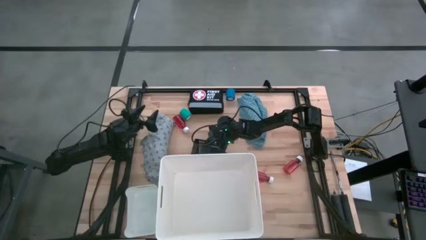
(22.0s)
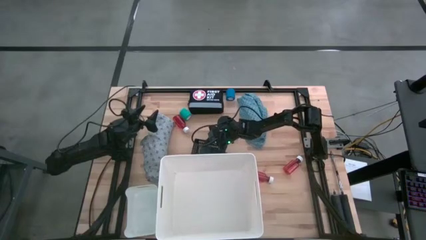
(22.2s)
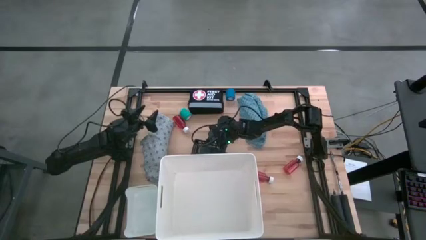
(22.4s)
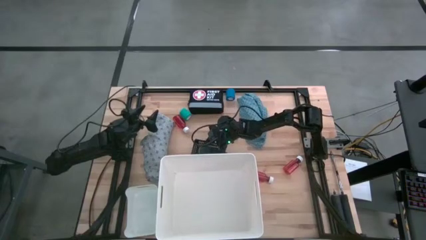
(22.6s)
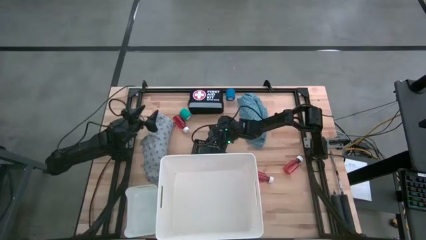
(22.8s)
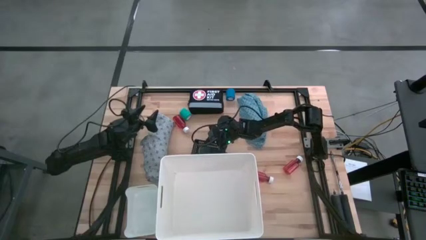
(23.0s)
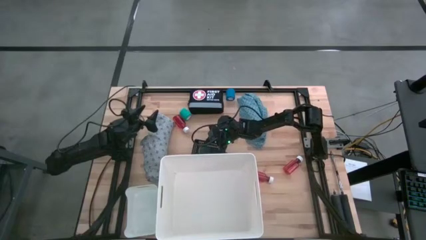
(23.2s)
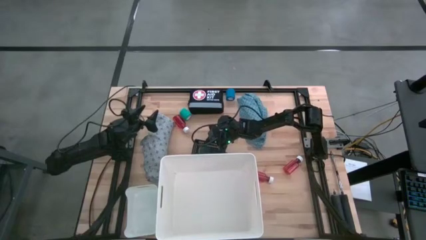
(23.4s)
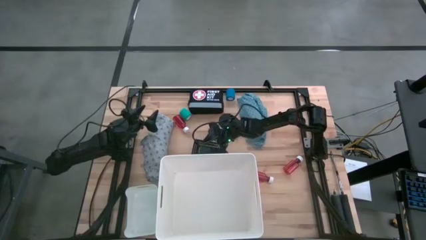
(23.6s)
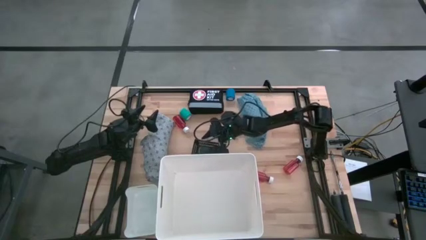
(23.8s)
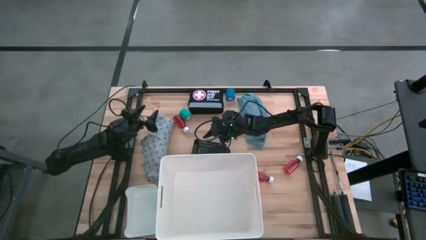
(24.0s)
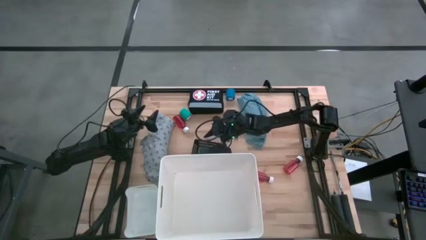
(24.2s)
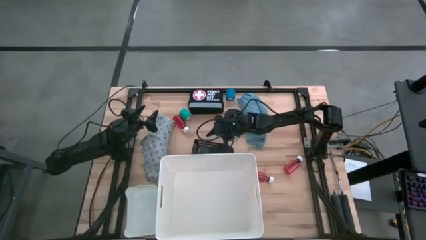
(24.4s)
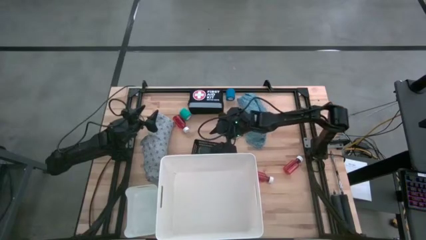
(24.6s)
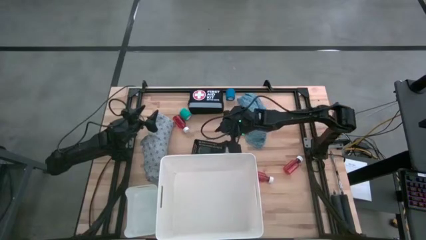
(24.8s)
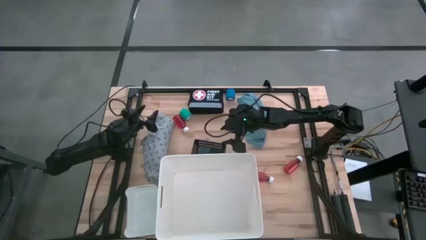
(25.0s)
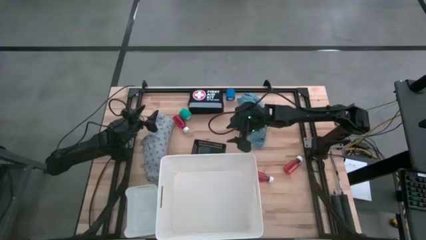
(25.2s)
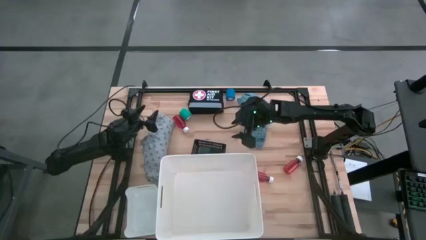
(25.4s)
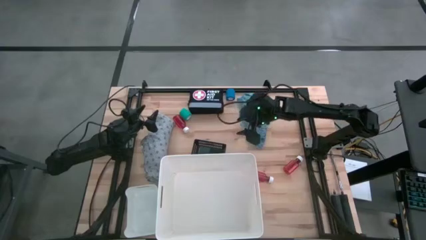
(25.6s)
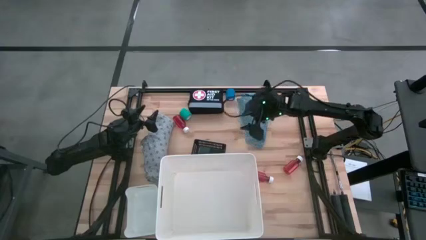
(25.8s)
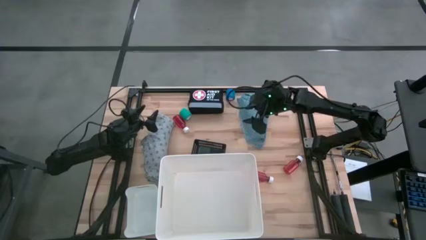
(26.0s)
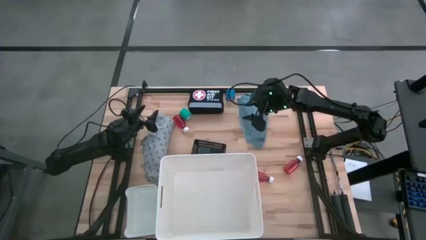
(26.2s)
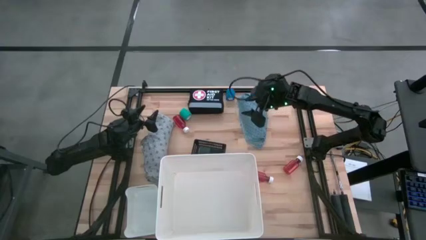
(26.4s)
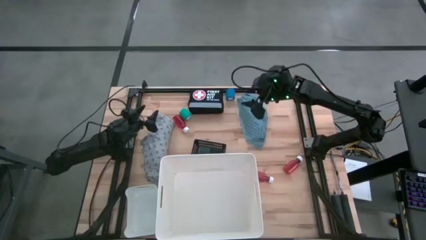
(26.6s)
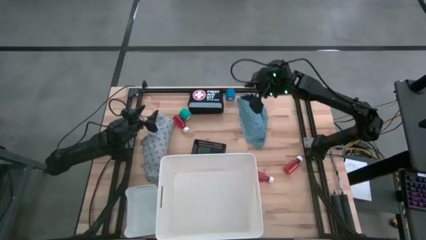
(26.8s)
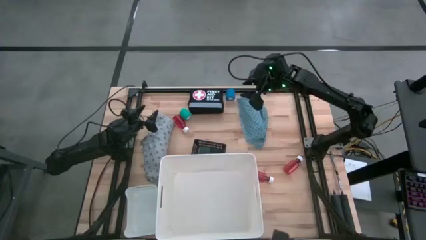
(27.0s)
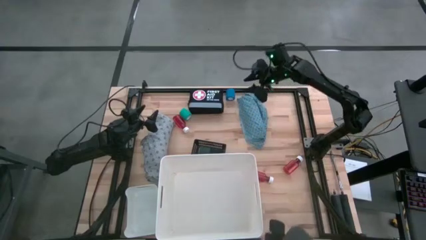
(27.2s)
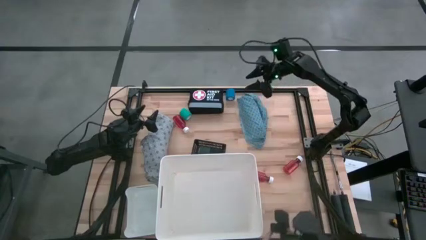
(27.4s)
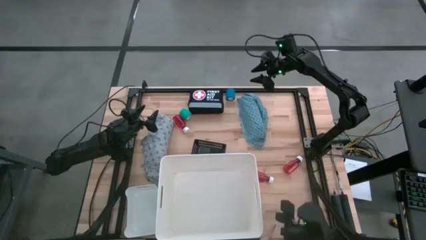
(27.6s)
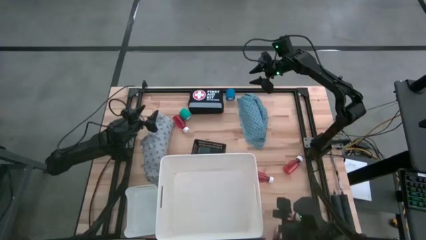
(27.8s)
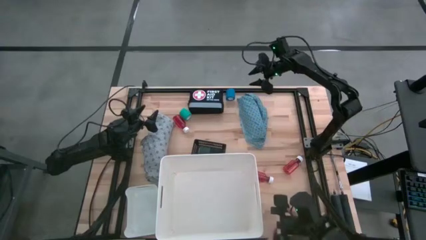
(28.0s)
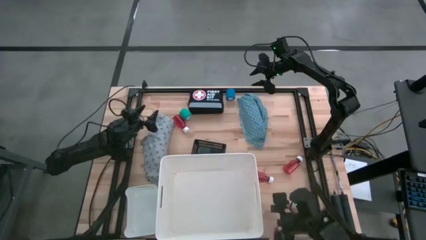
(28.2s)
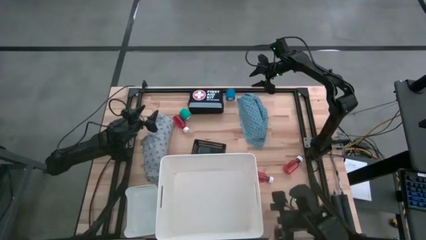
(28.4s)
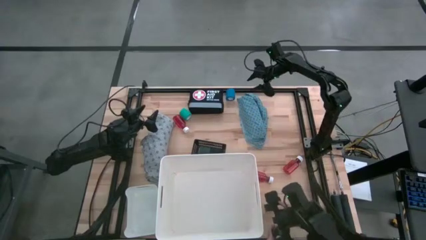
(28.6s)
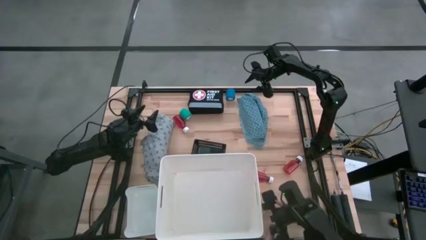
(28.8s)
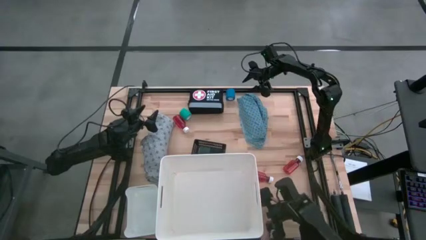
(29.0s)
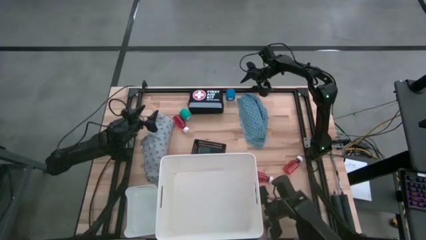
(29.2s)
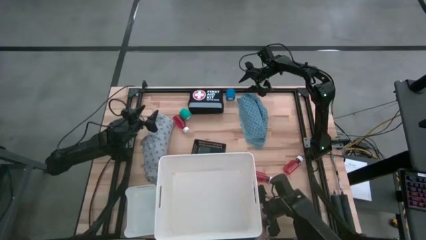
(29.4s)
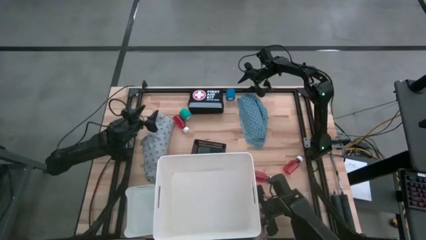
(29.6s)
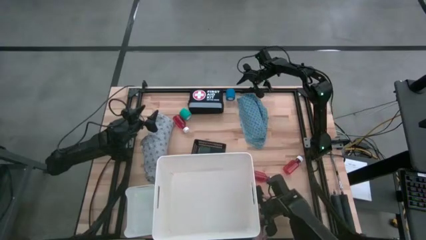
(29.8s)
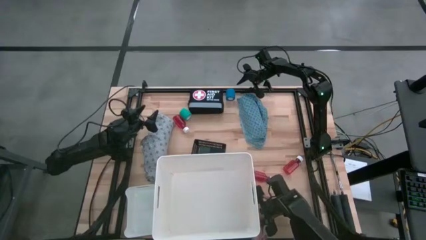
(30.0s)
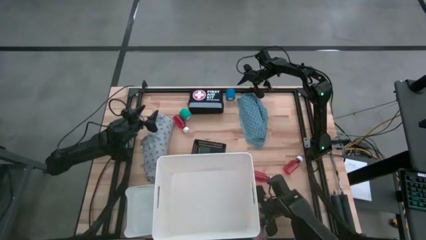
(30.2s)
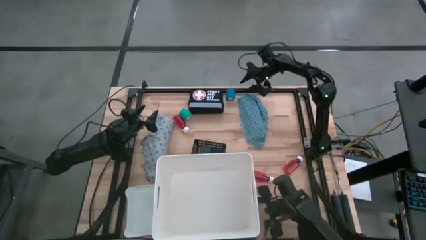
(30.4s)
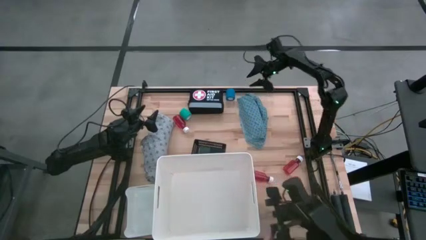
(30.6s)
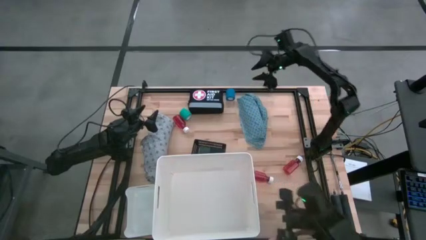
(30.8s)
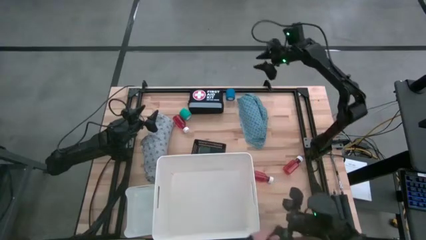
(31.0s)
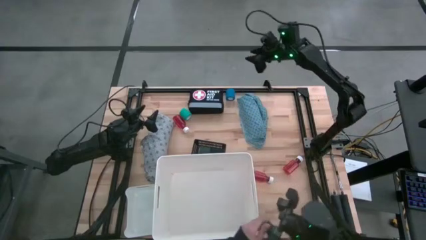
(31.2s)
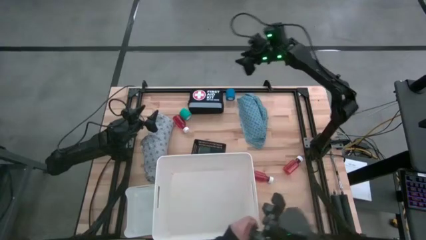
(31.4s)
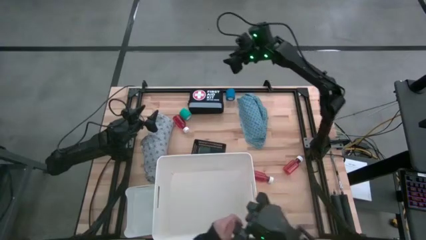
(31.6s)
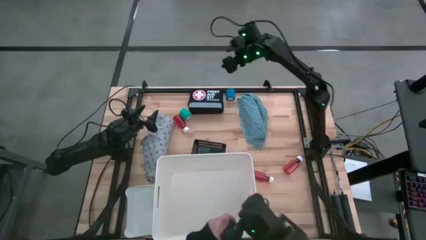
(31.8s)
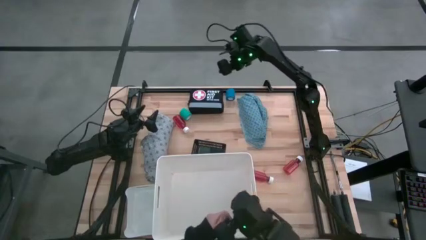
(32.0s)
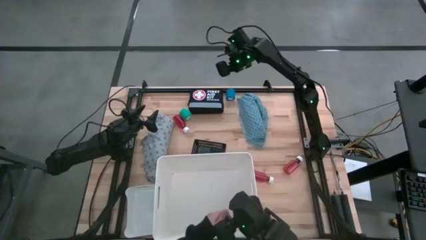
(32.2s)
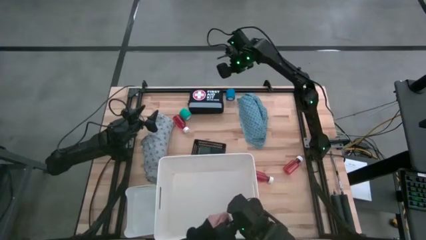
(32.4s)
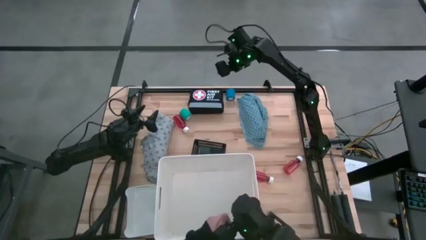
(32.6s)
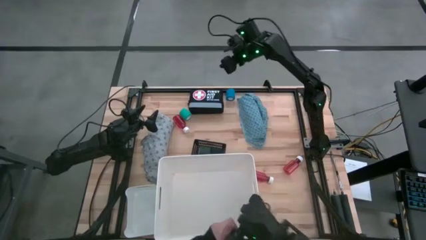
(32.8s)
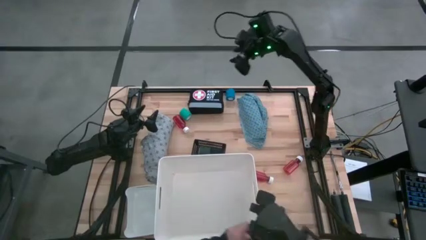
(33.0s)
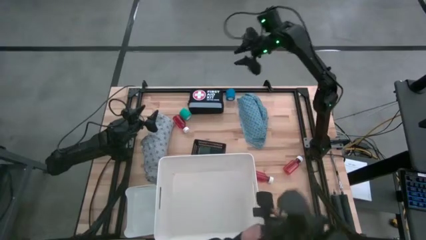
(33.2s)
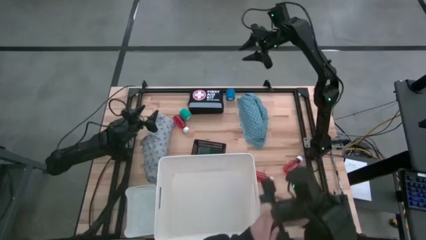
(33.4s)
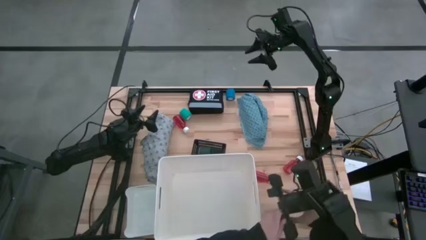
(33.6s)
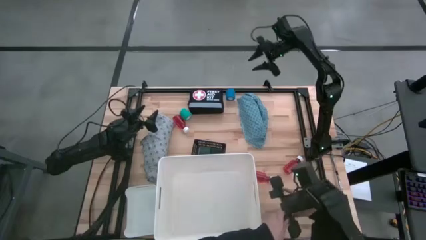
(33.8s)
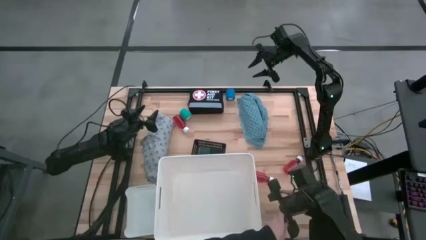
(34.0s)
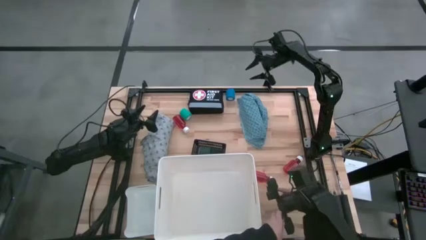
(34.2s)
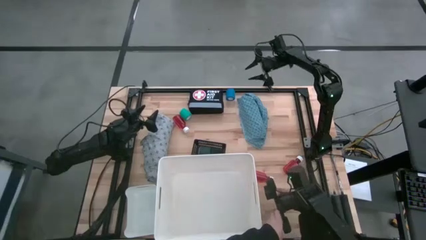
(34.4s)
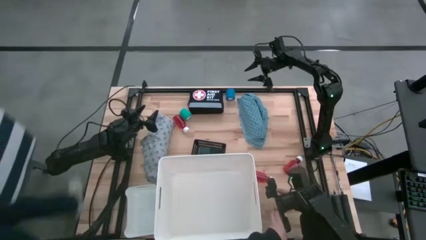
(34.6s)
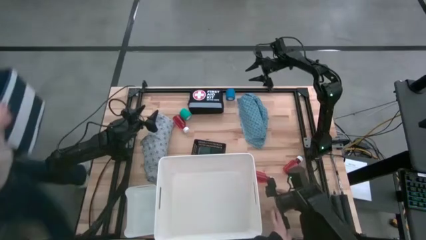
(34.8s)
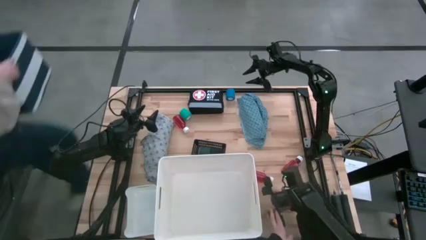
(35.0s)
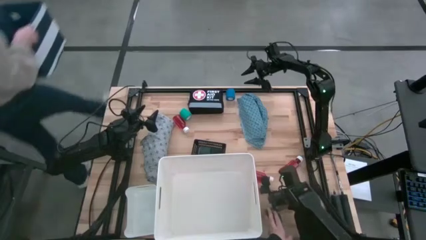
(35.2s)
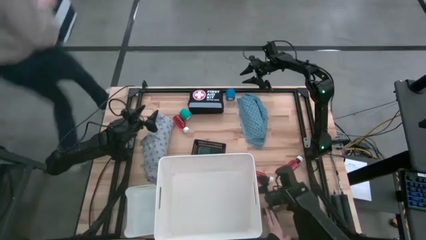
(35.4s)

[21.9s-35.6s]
Task: Pick & Place Medicine items
Put the blue bandage into the black bin
